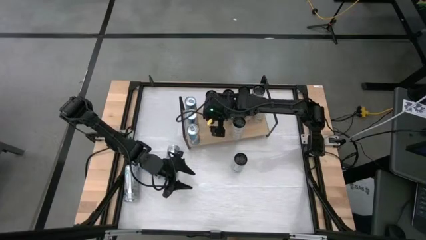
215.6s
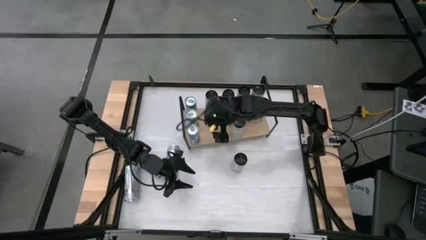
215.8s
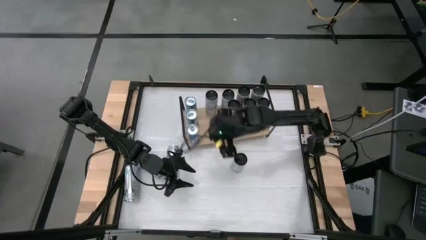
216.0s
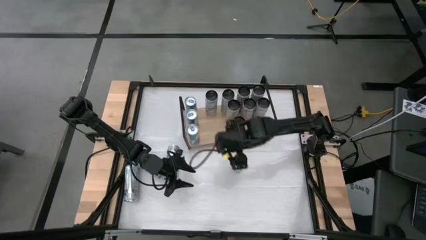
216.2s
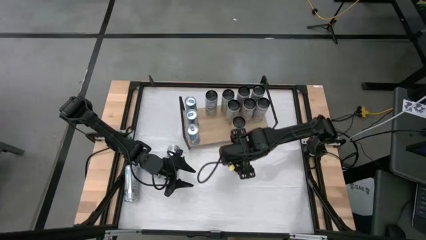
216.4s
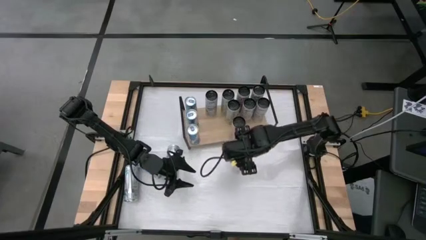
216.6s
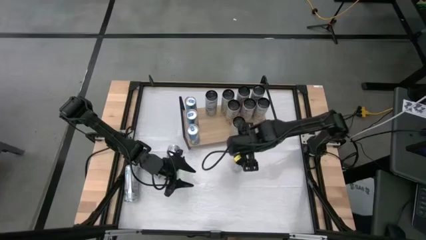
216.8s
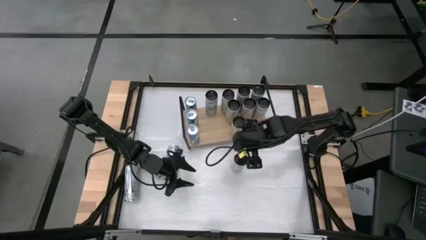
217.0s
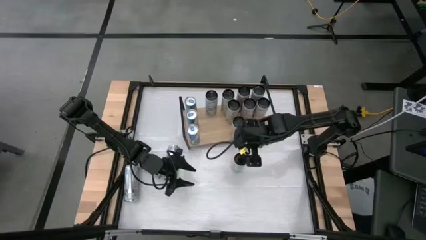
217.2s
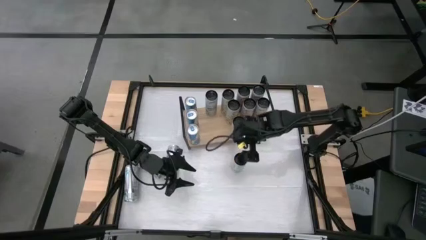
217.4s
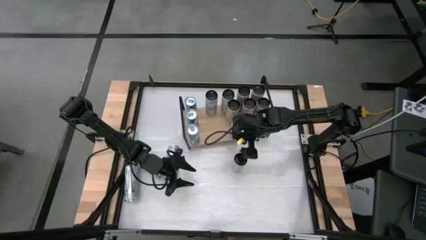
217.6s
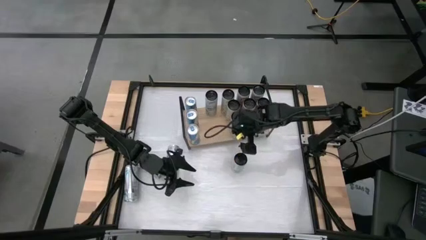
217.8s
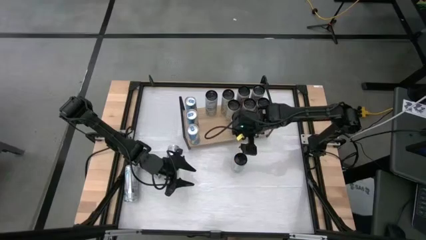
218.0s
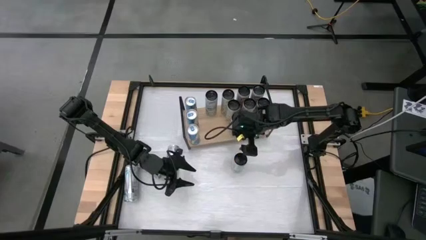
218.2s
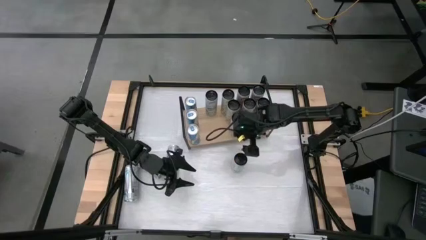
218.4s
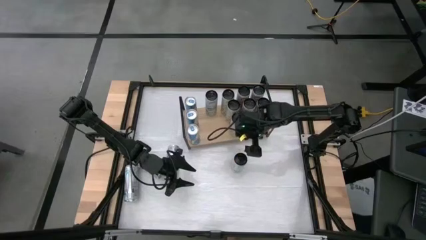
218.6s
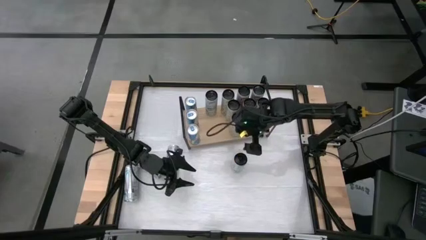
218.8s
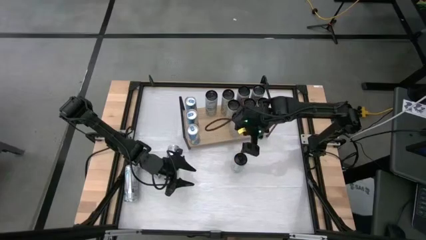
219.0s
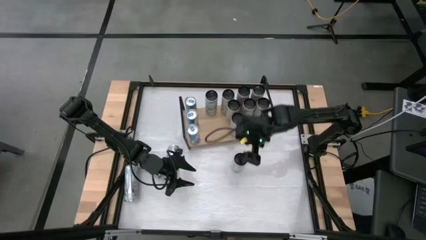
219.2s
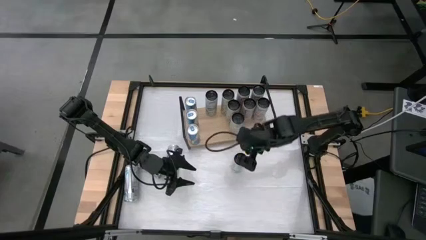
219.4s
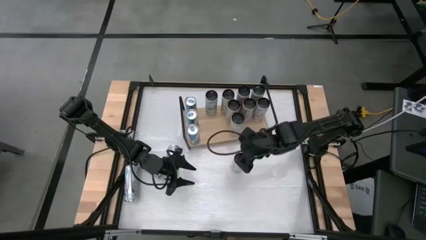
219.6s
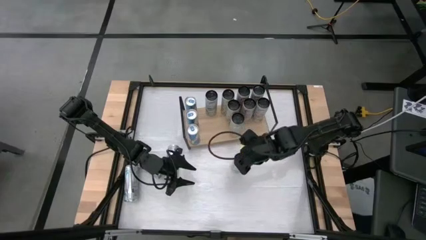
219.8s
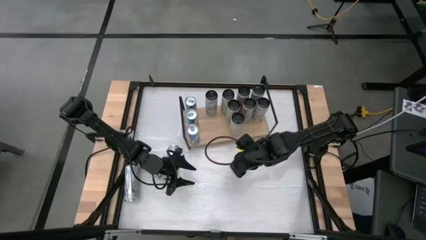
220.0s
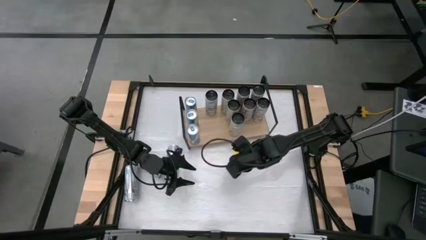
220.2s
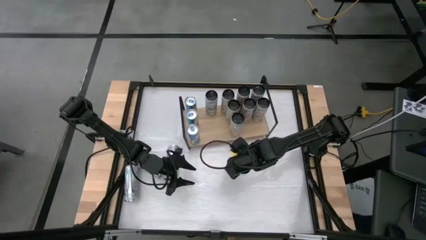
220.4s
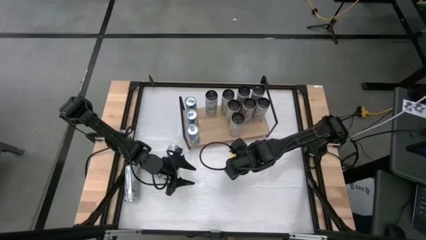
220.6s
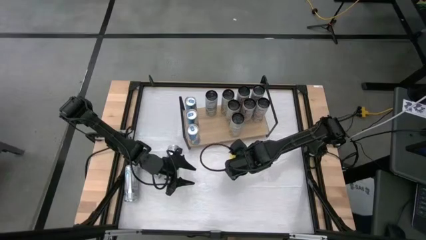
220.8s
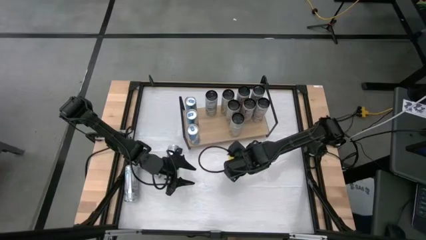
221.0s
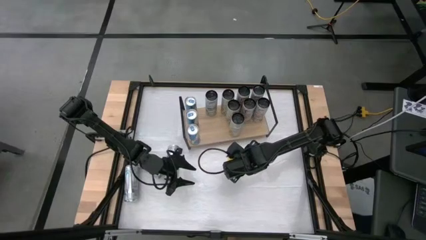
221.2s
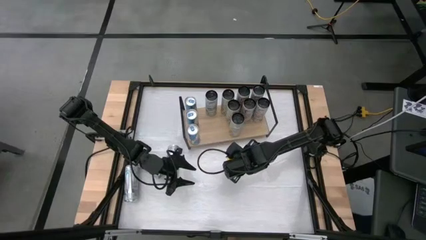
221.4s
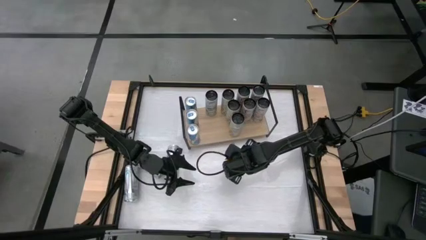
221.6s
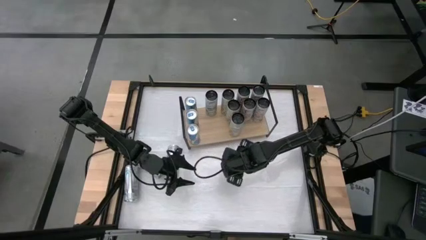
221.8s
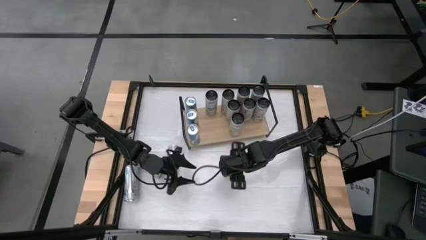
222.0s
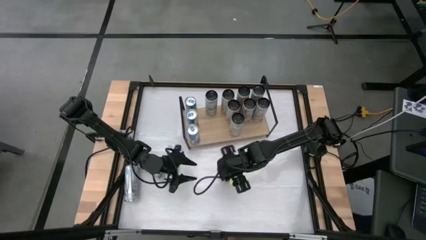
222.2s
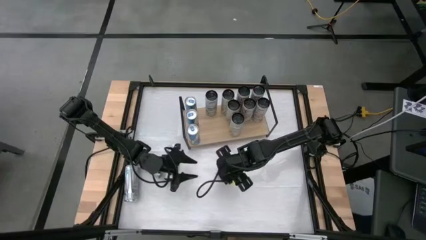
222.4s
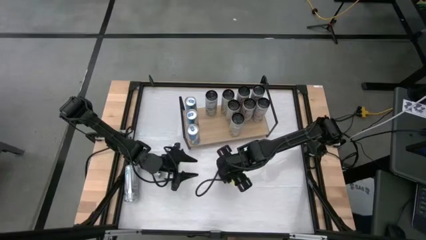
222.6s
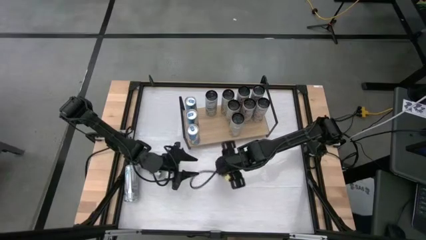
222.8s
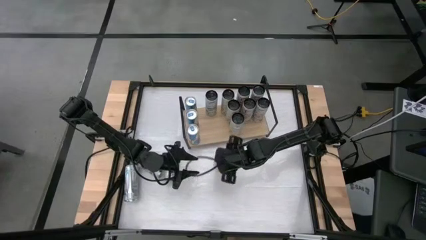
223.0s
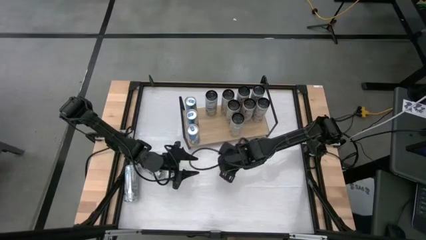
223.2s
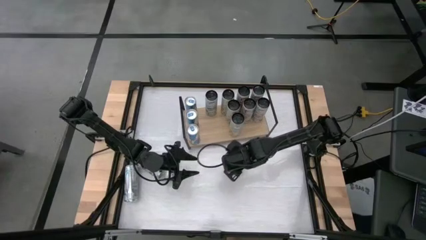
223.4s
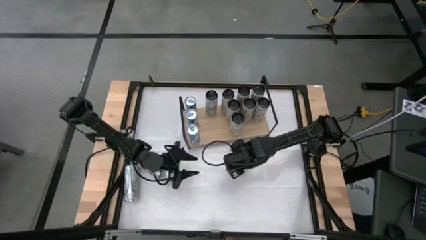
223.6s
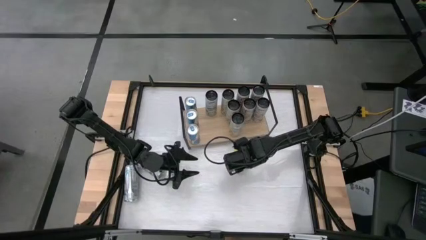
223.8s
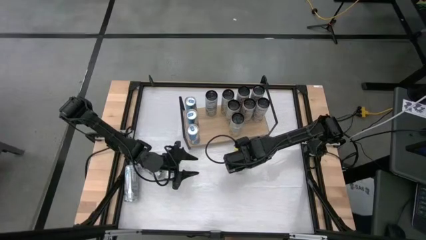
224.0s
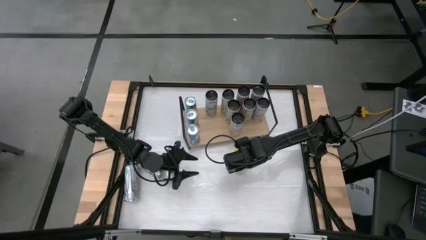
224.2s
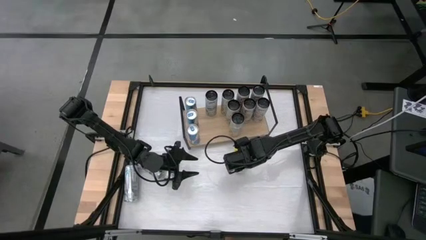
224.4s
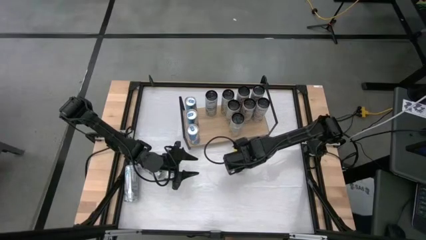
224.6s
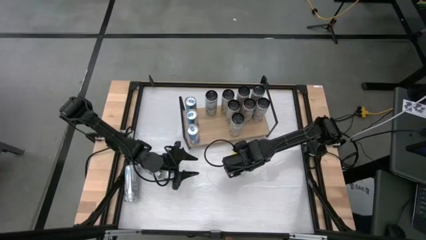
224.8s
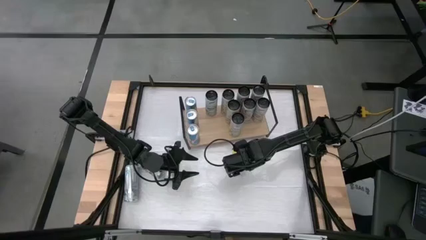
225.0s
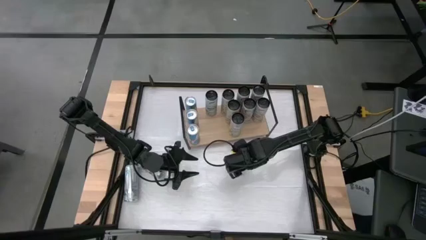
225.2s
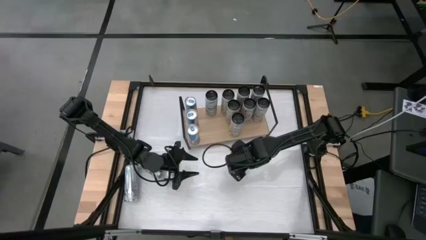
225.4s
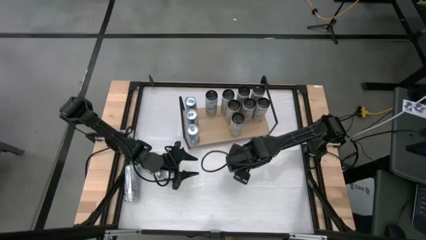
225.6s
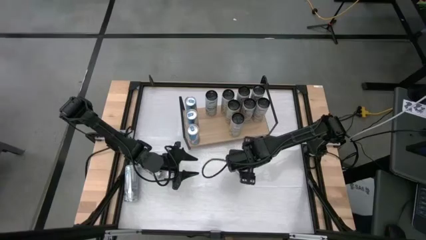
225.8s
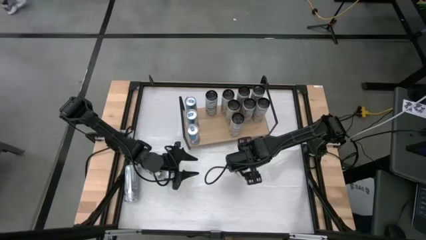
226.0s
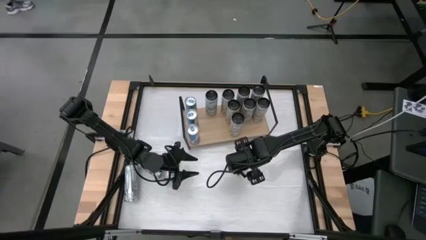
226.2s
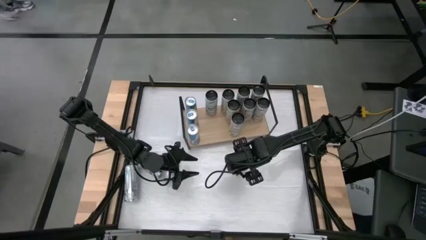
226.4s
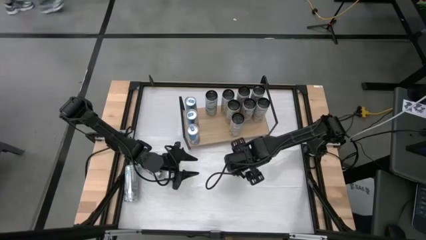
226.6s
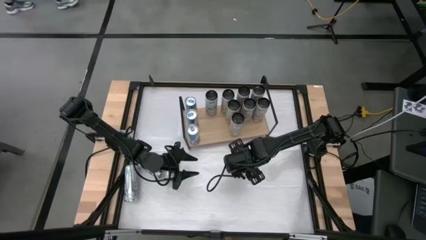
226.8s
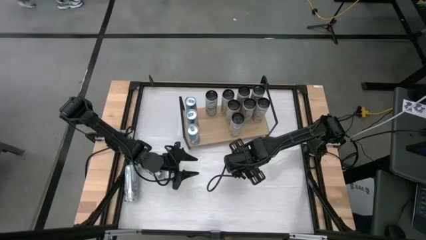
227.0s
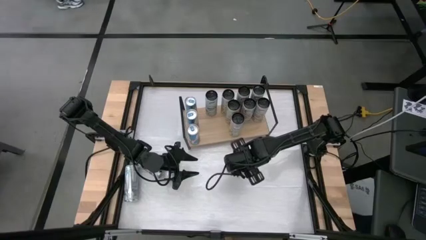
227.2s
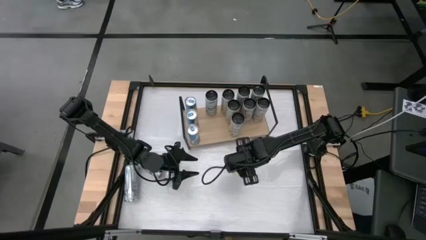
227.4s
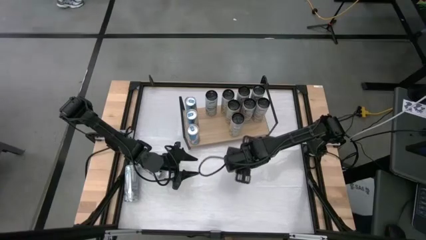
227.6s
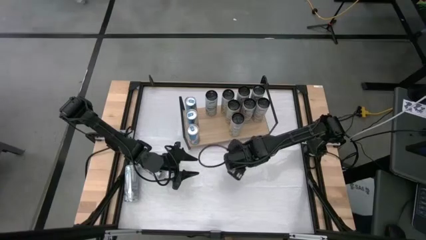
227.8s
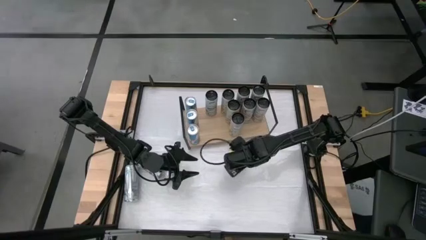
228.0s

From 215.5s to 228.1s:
Task: Place canned beverage on shelf
Put the white-blue soda can on the shelf aligned with the other white-blue soda can

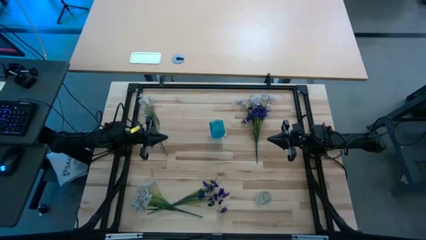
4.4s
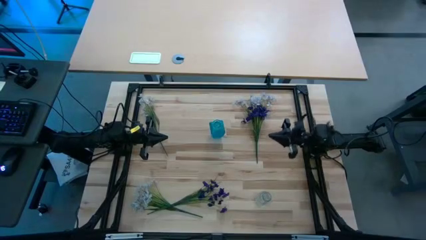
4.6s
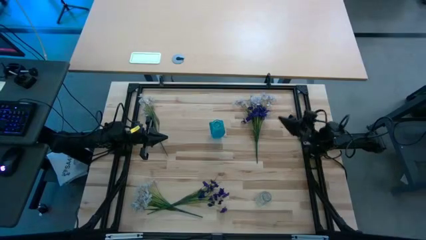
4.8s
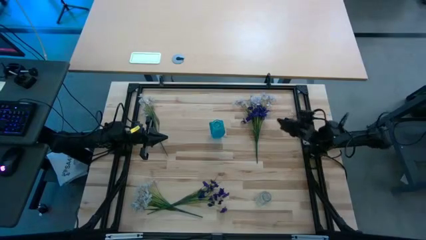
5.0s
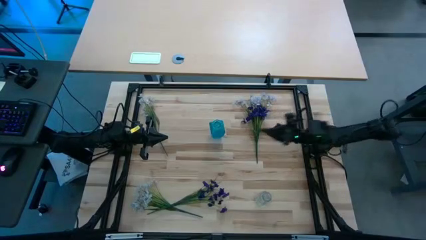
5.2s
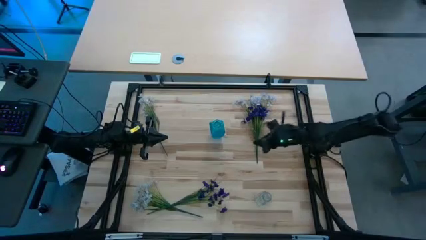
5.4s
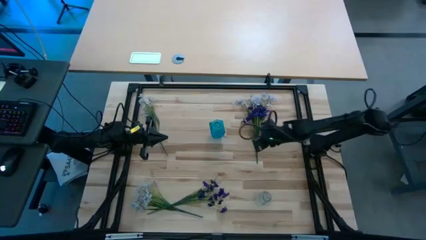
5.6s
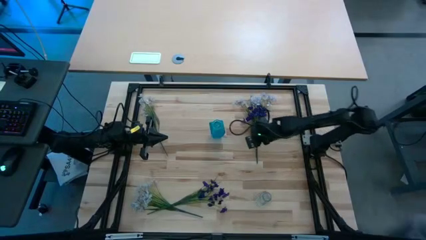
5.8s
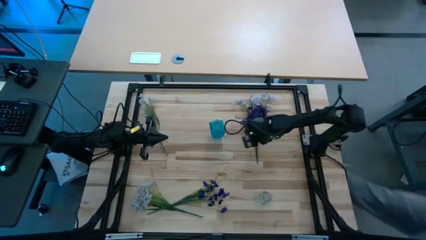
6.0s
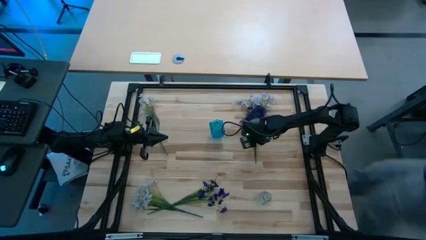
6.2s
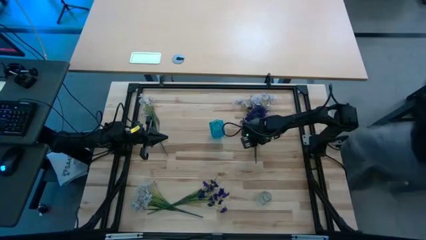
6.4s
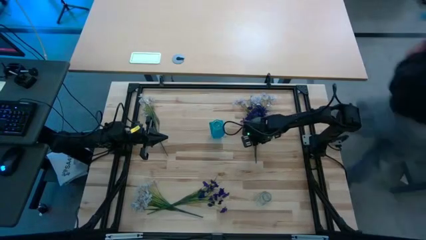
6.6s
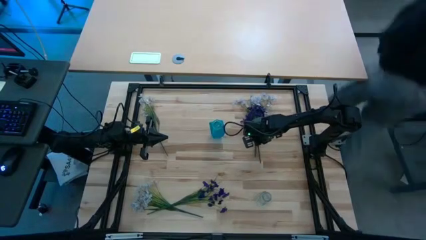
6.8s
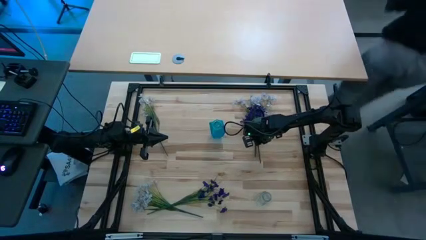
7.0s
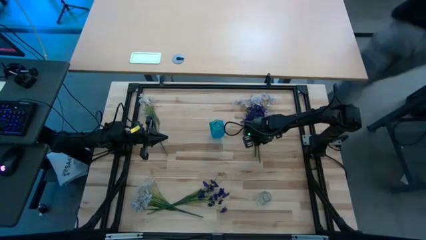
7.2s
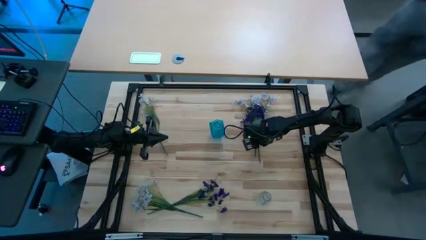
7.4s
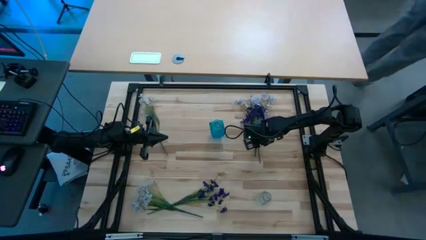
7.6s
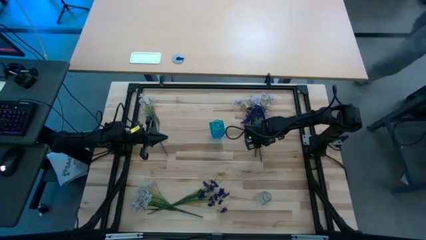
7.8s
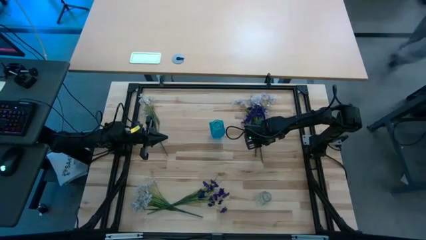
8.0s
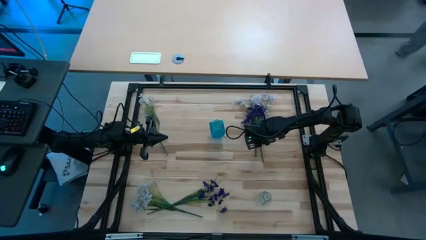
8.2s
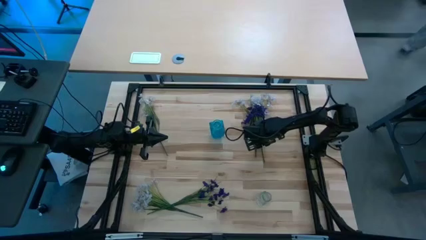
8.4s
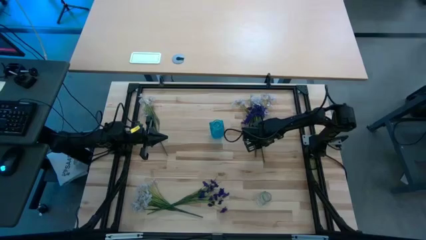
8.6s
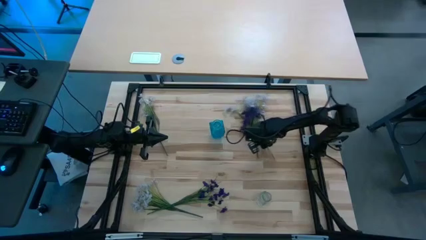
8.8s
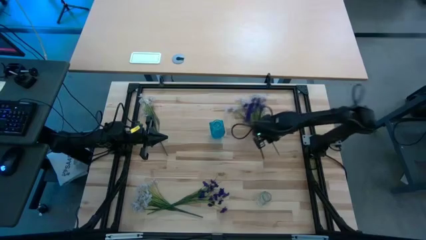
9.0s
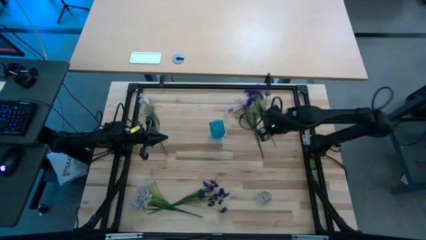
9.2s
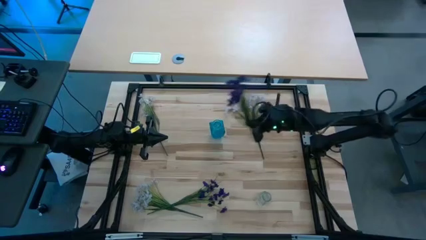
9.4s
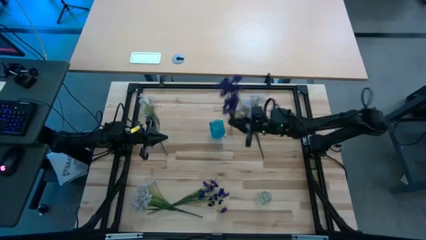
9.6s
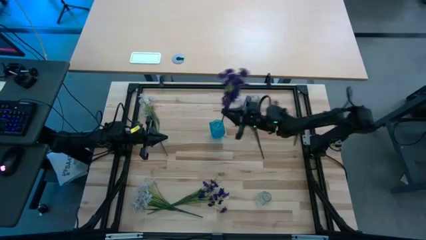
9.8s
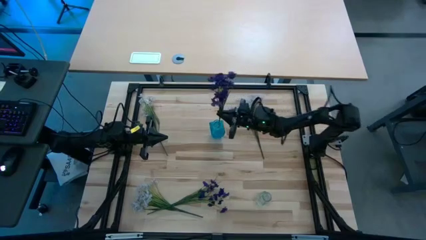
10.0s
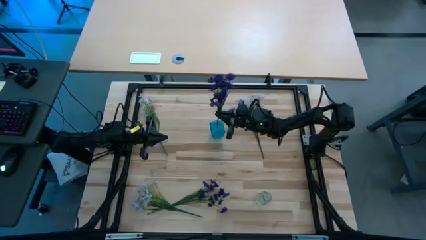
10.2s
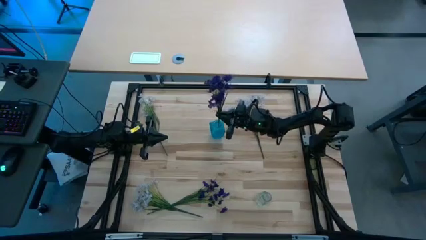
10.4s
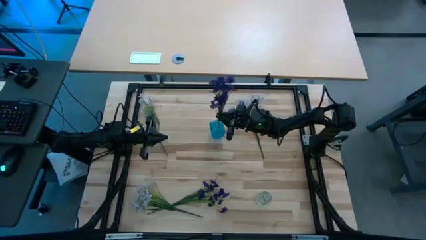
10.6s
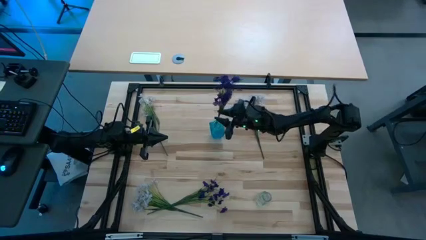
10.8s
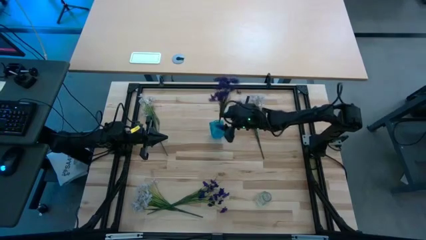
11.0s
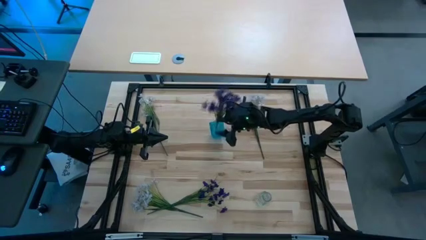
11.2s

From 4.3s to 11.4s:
Task: Sort flowers into vase by color
Put the top purple flowers into the blue crystal vase
